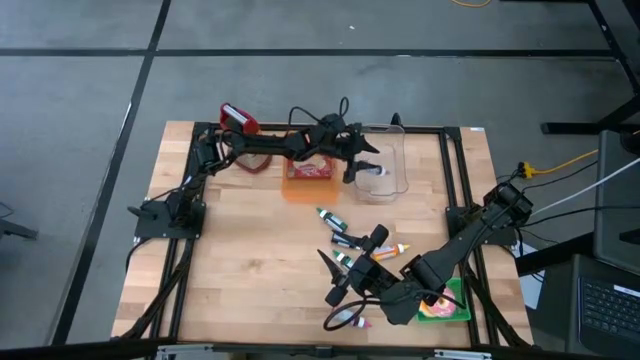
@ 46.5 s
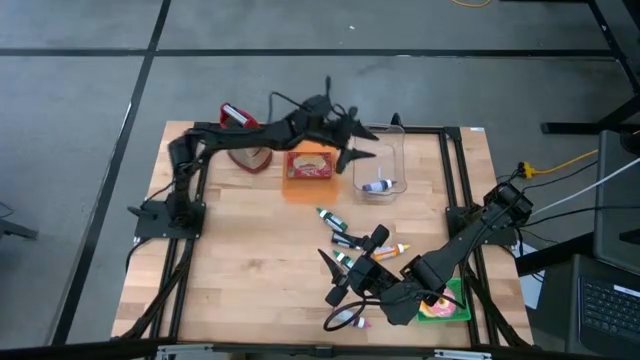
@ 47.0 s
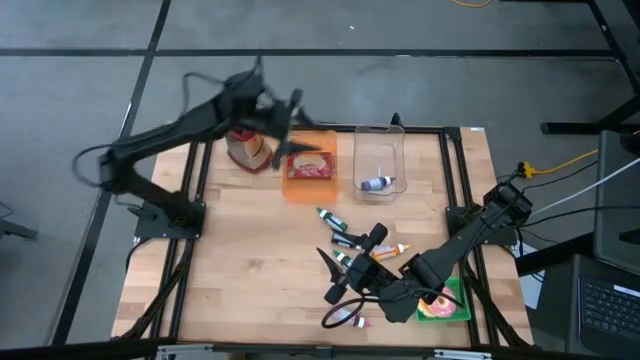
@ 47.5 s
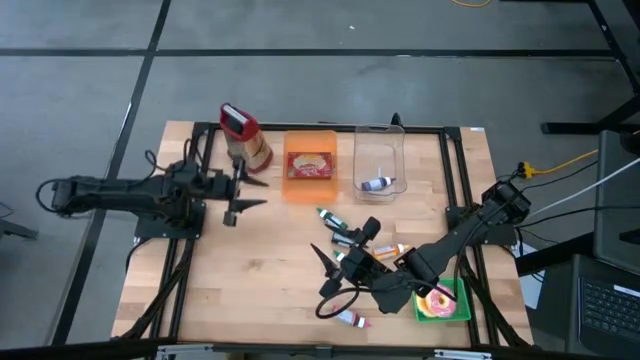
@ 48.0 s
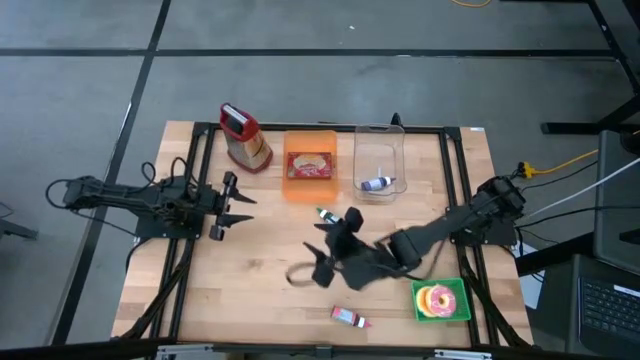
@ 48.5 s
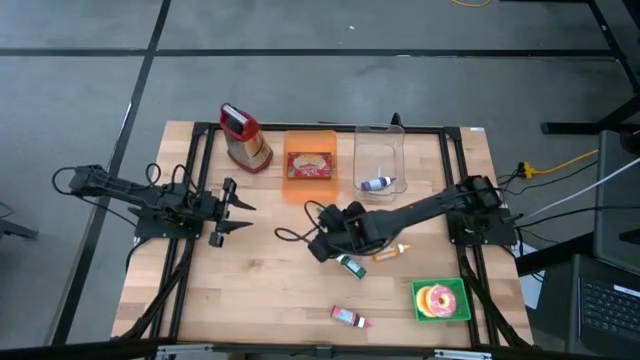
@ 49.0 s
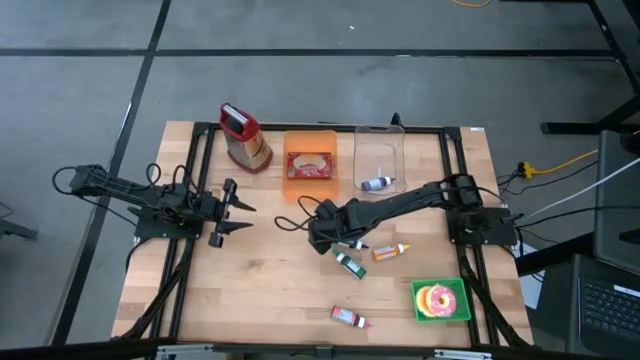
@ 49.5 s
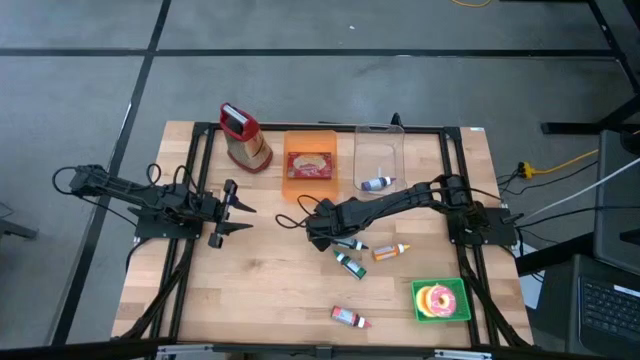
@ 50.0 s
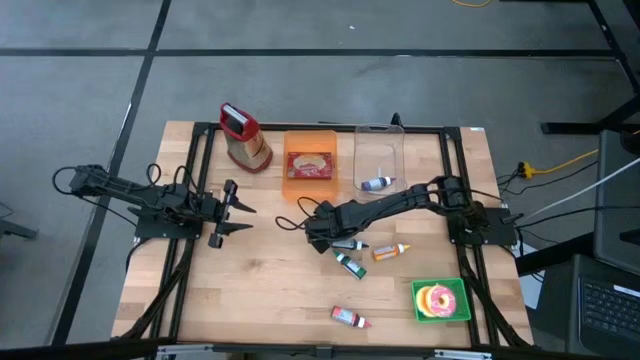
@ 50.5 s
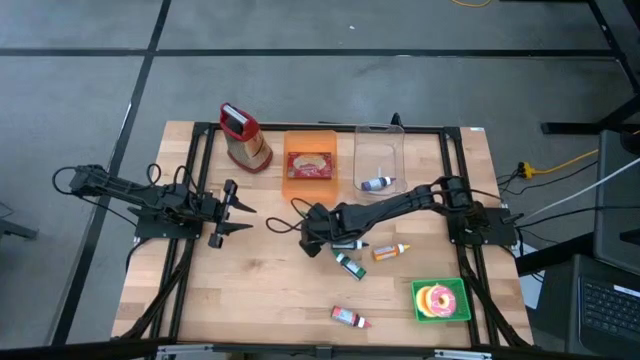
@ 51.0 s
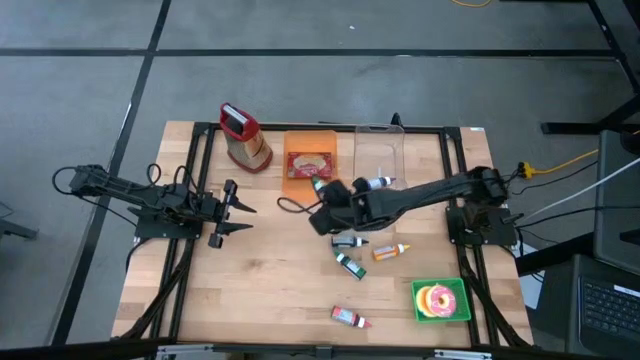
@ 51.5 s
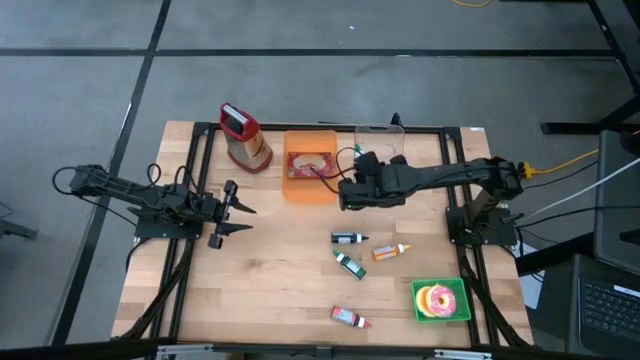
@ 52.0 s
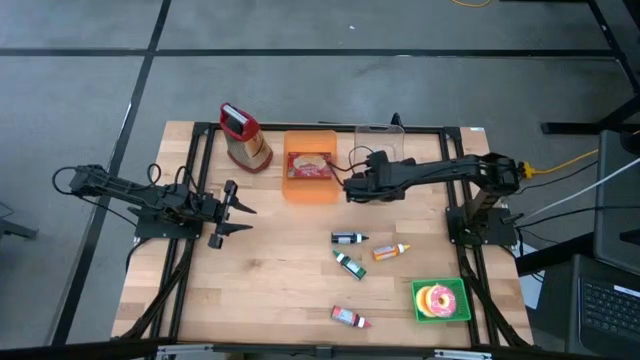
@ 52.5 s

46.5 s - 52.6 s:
Put the top green food coloring into the transparent bin

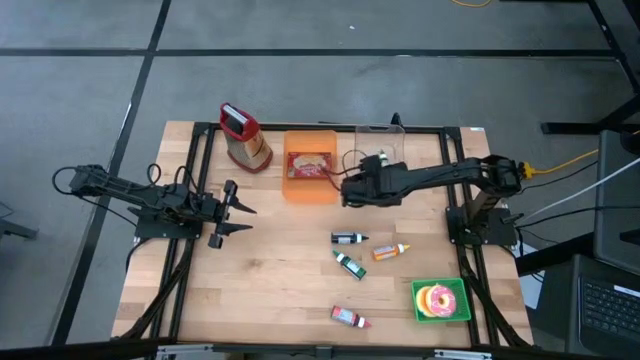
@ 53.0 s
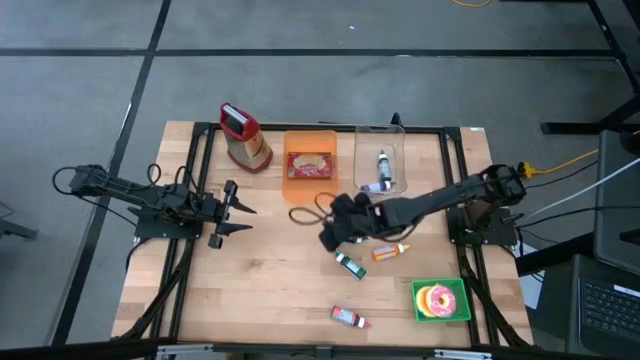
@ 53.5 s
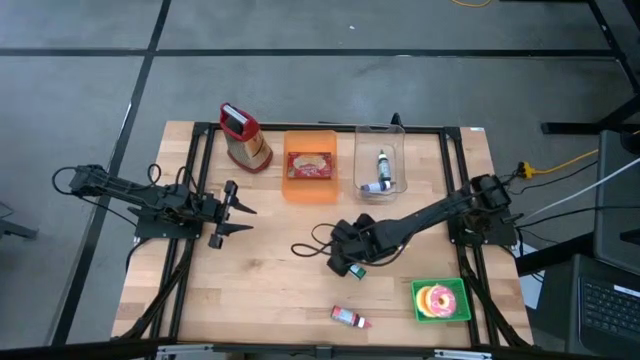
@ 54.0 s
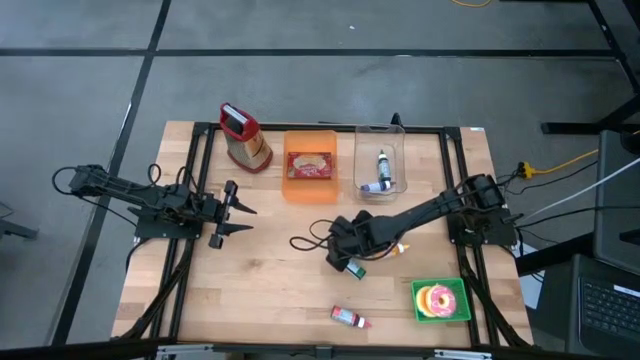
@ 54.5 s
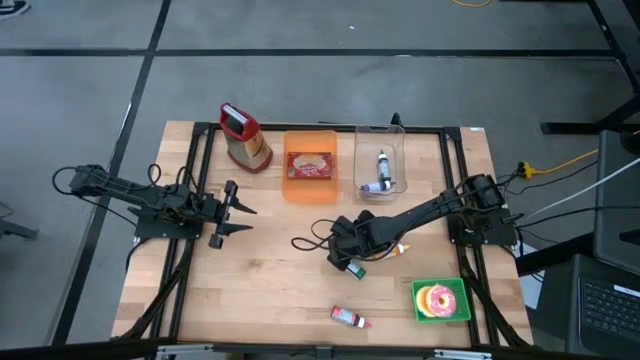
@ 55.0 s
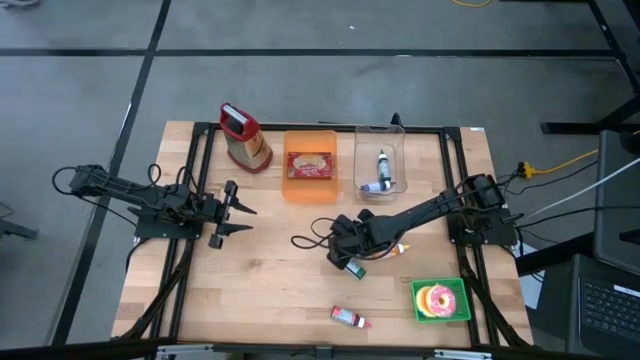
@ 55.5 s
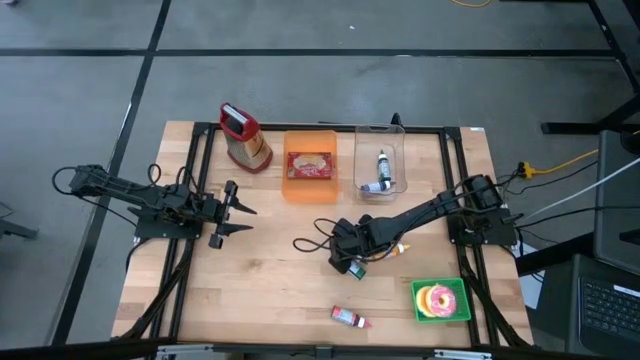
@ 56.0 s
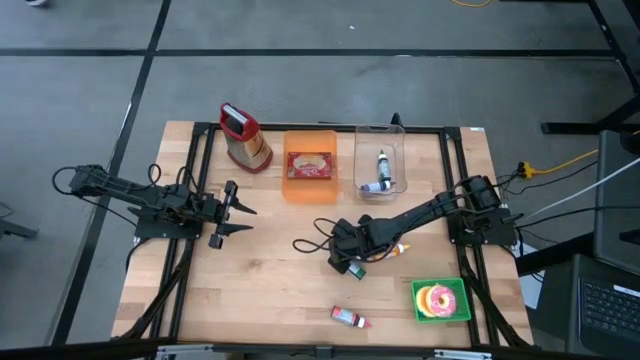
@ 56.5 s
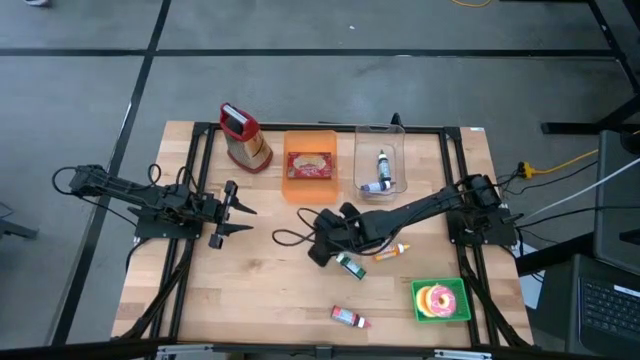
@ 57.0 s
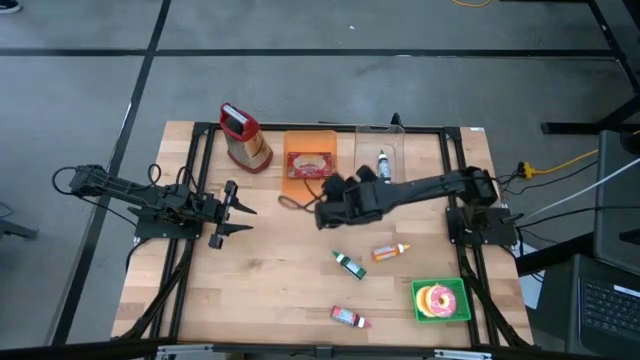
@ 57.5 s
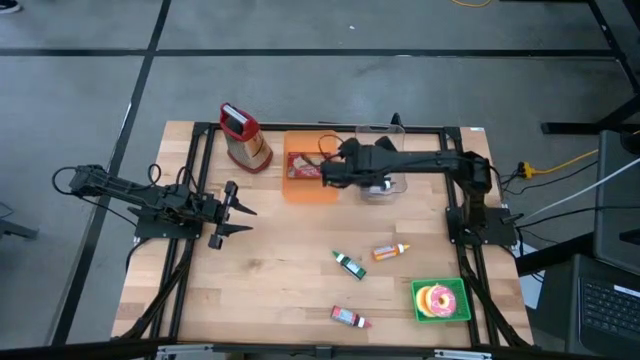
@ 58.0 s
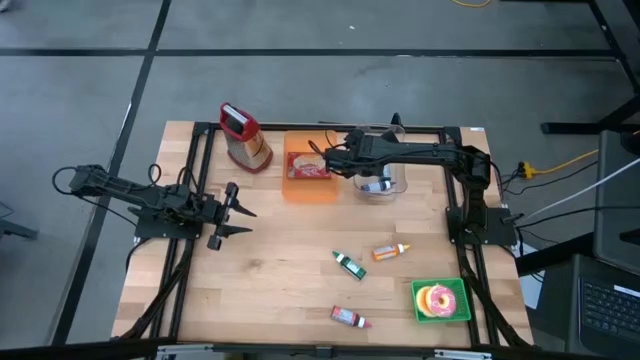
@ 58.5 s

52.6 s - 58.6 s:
Put the black food coloring into the transparent bin

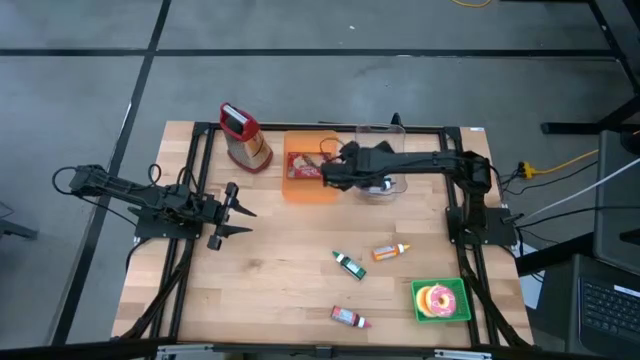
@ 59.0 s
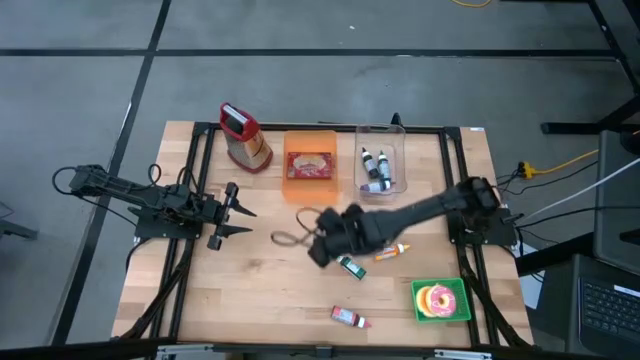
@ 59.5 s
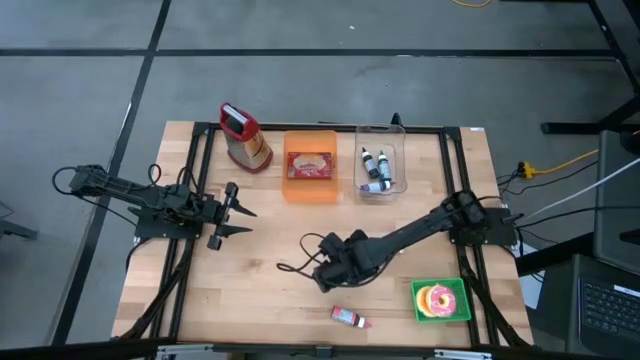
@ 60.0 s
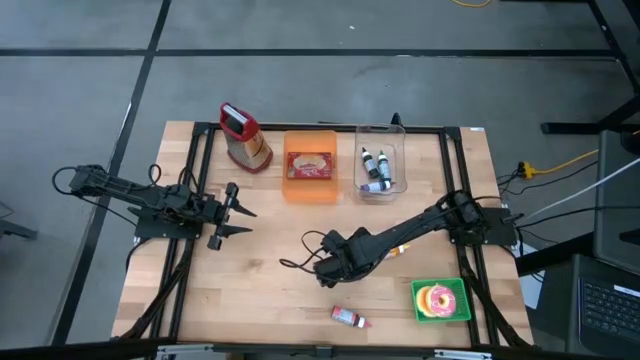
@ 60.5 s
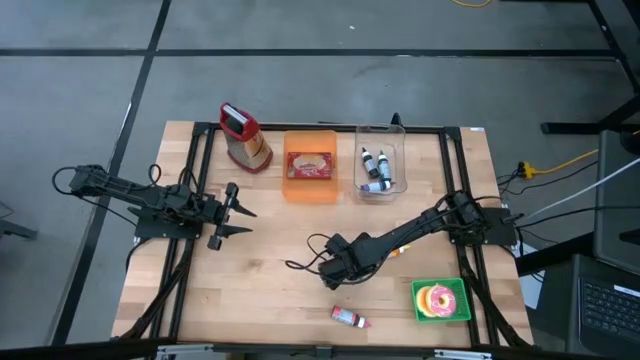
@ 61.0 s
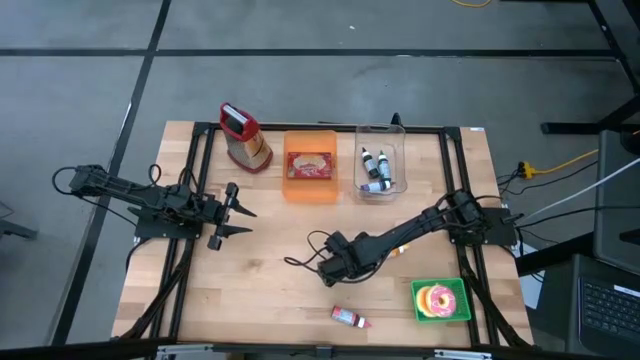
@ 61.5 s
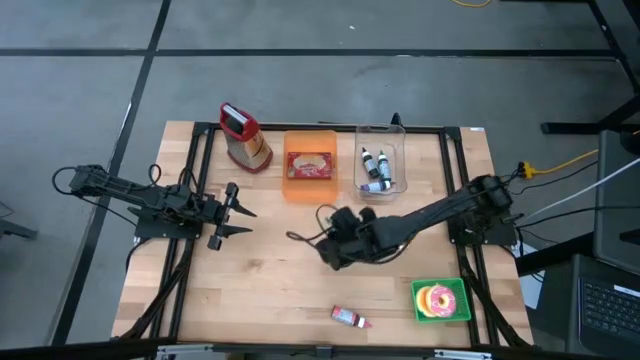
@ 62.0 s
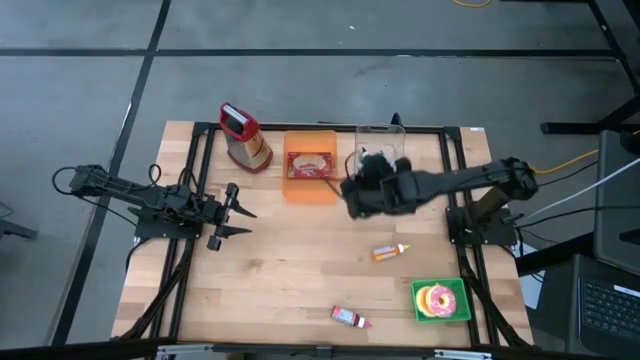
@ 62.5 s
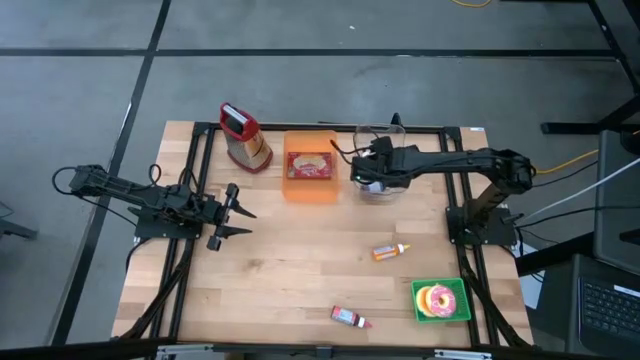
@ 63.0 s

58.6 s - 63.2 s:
Put the green food coloring into the transparent bin

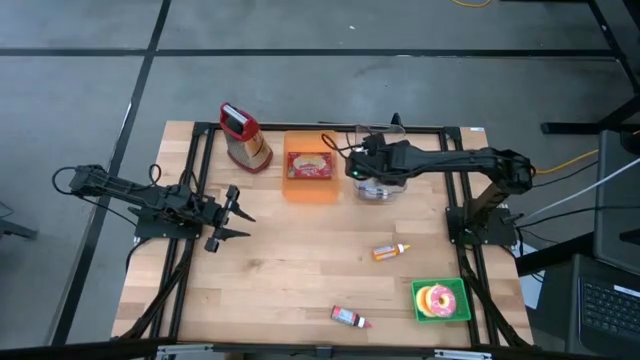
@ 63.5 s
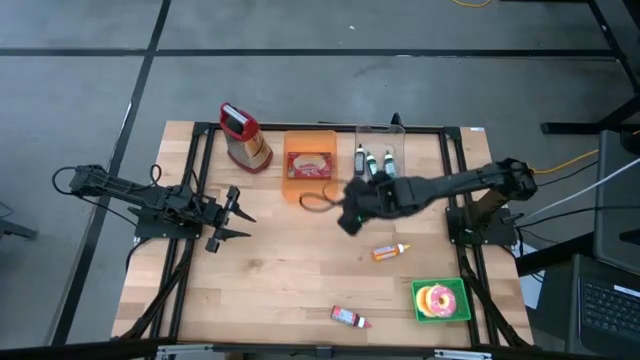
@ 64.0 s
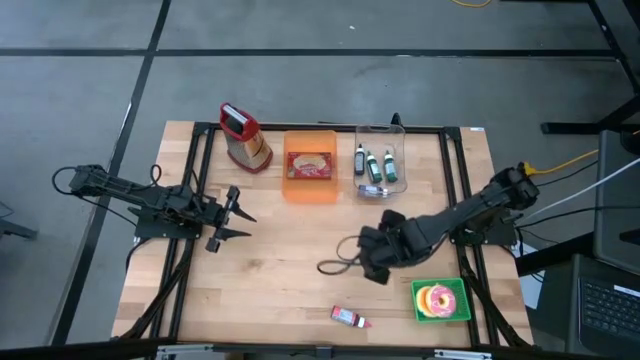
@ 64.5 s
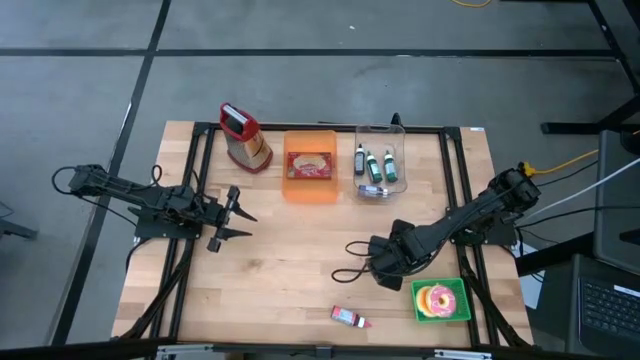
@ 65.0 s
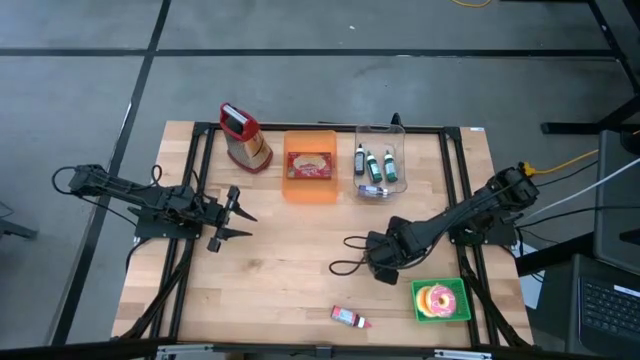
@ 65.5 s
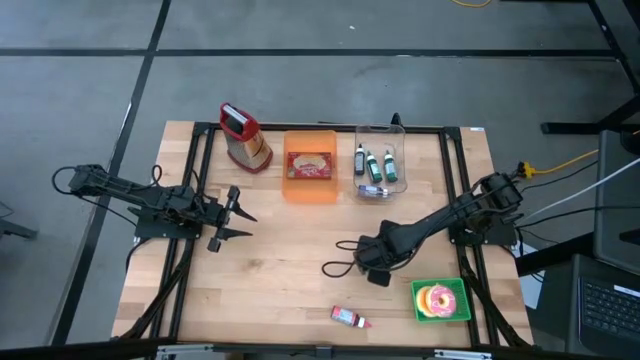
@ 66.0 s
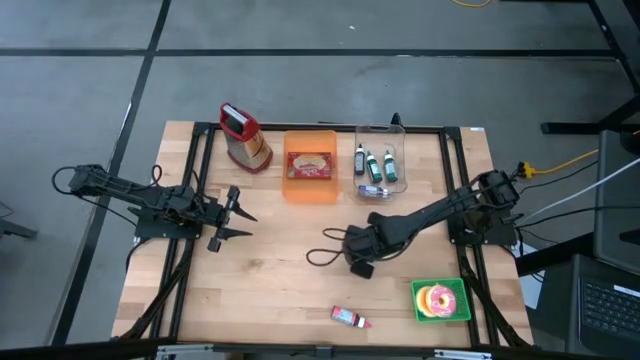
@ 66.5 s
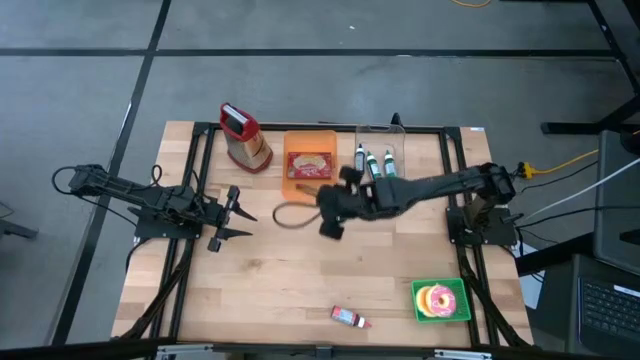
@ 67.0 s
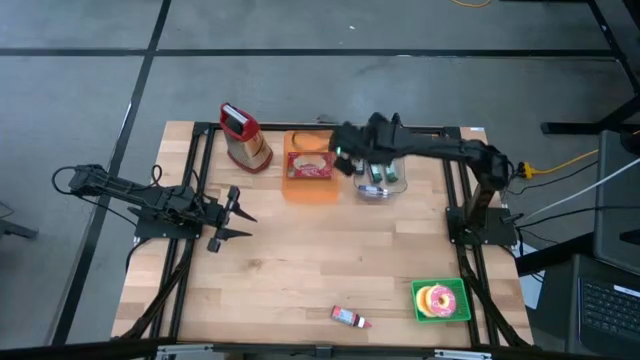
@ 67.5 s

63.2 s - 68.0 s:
Put the orange food coloring into the transparent bin
